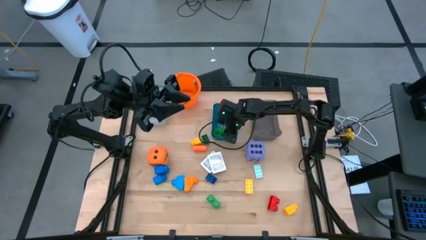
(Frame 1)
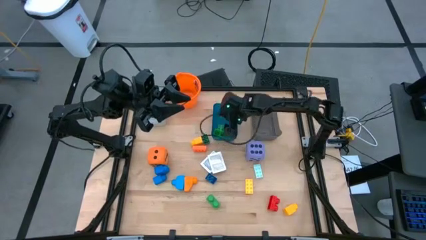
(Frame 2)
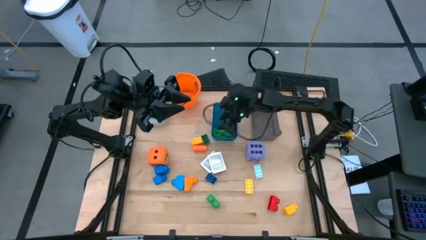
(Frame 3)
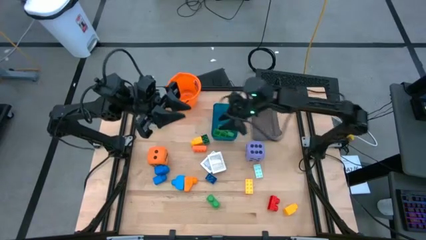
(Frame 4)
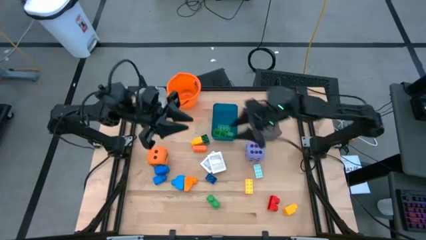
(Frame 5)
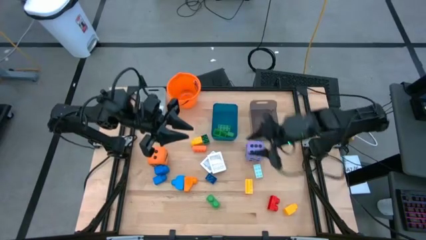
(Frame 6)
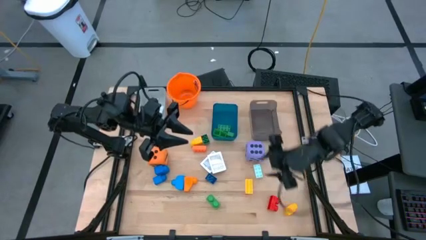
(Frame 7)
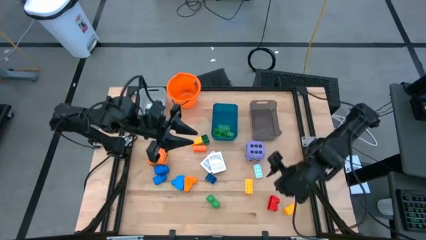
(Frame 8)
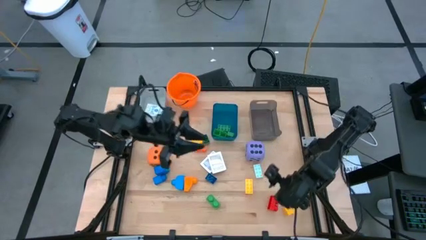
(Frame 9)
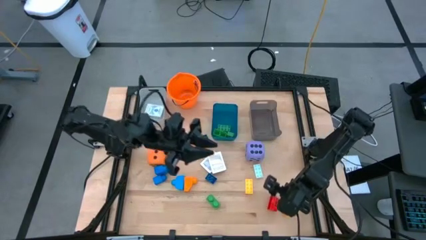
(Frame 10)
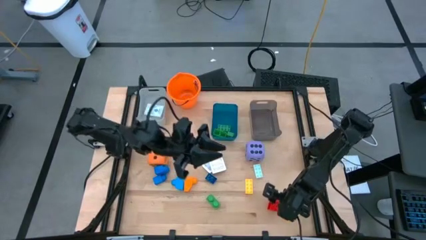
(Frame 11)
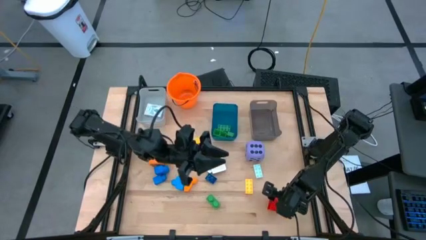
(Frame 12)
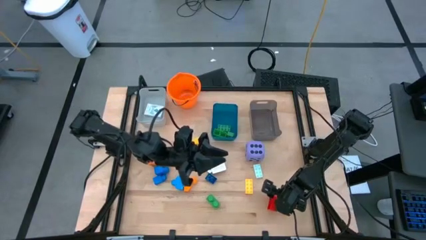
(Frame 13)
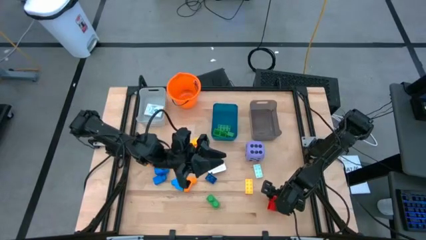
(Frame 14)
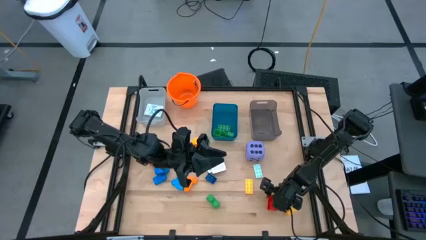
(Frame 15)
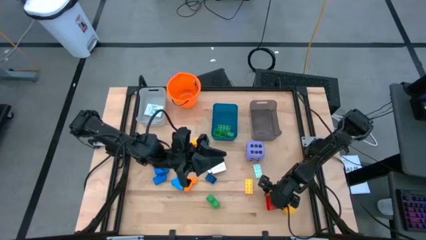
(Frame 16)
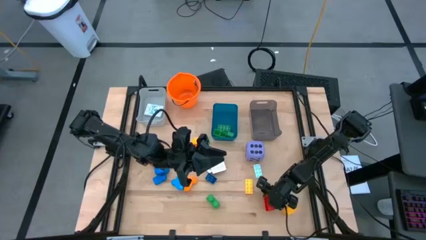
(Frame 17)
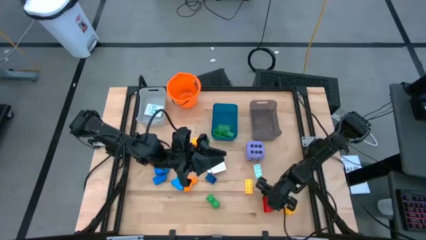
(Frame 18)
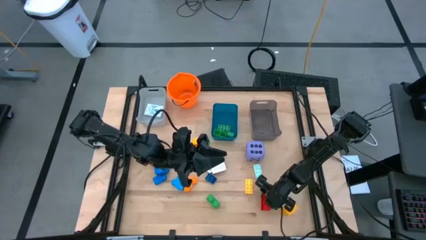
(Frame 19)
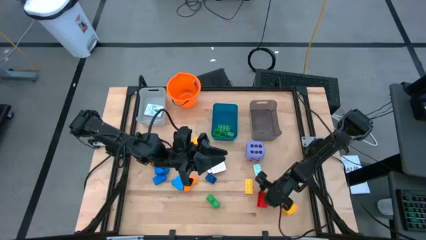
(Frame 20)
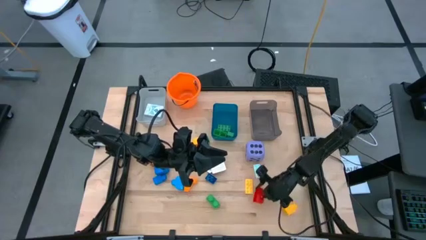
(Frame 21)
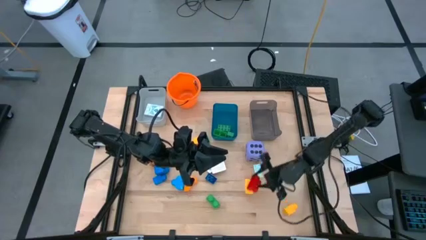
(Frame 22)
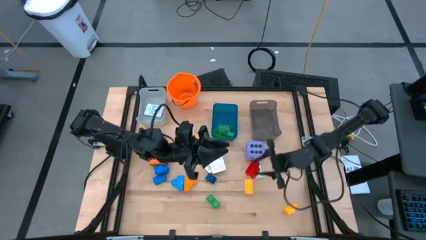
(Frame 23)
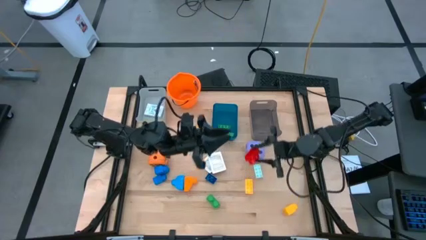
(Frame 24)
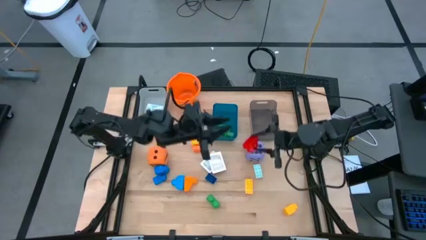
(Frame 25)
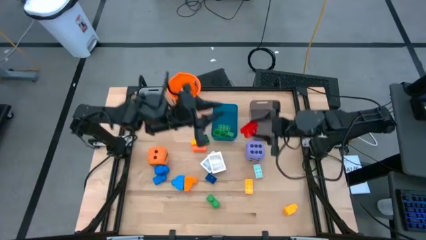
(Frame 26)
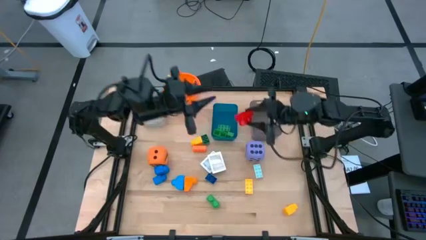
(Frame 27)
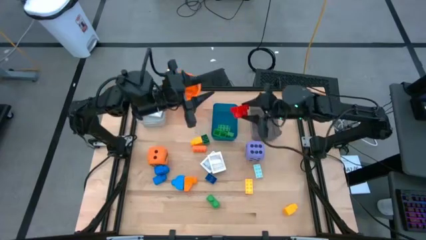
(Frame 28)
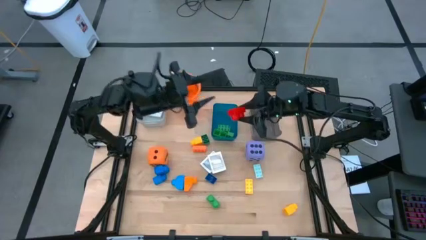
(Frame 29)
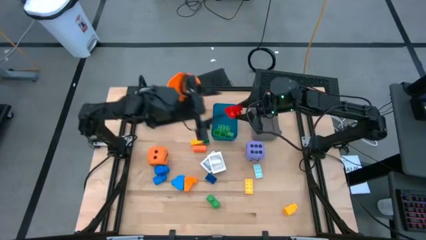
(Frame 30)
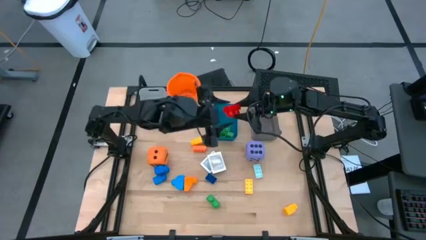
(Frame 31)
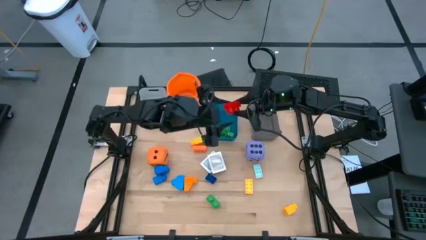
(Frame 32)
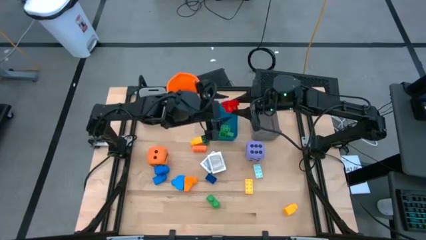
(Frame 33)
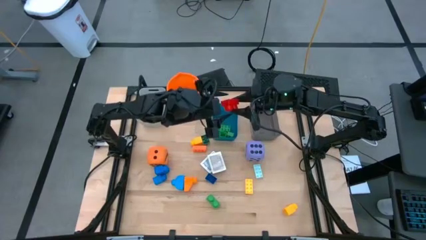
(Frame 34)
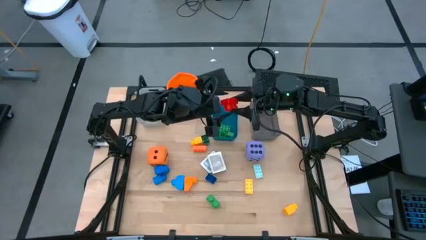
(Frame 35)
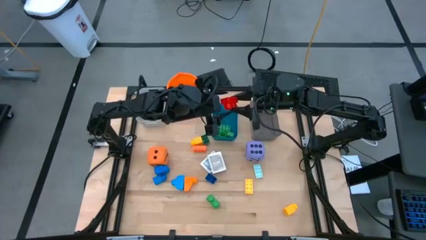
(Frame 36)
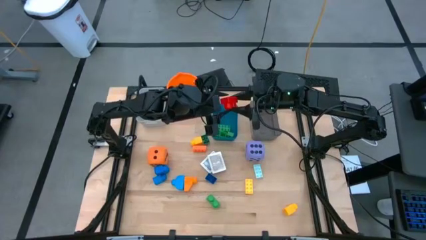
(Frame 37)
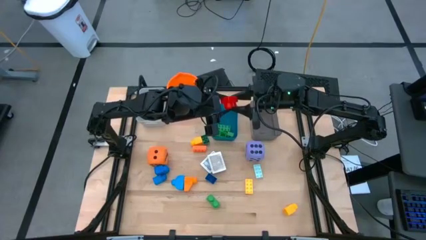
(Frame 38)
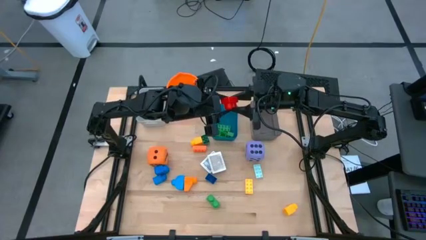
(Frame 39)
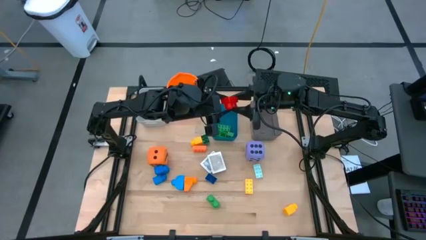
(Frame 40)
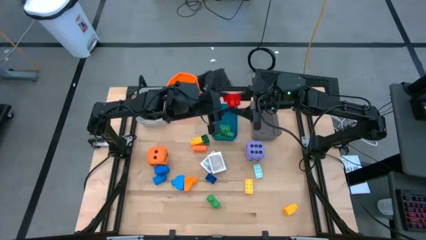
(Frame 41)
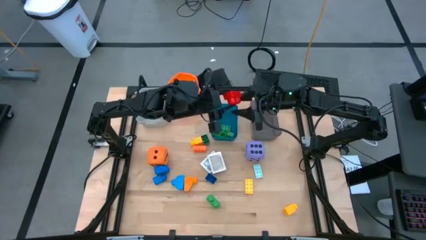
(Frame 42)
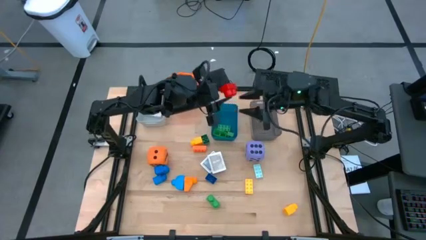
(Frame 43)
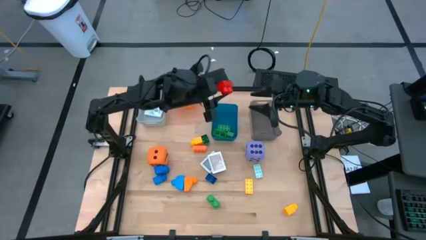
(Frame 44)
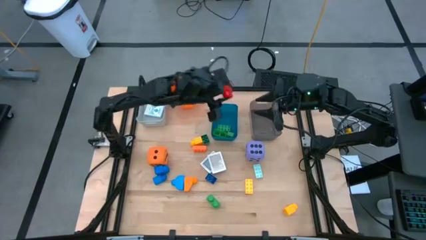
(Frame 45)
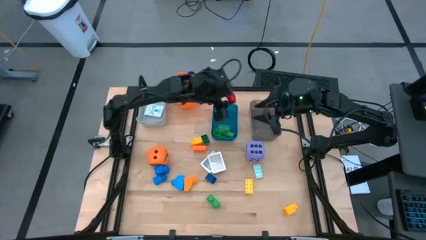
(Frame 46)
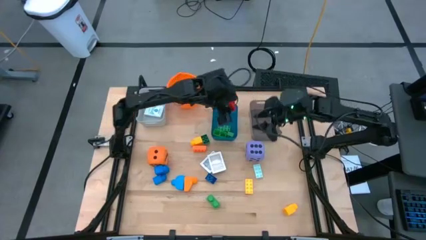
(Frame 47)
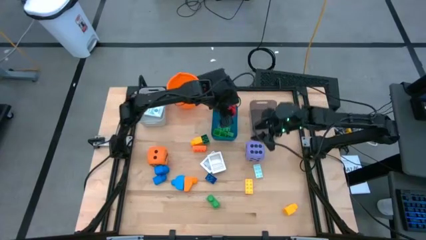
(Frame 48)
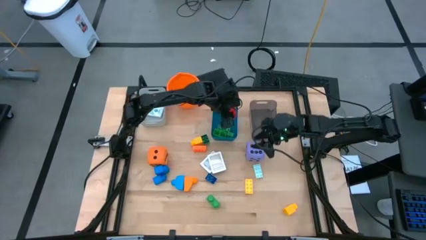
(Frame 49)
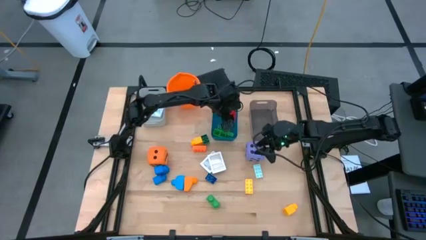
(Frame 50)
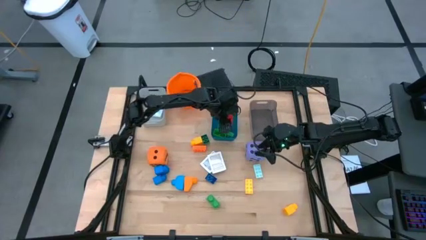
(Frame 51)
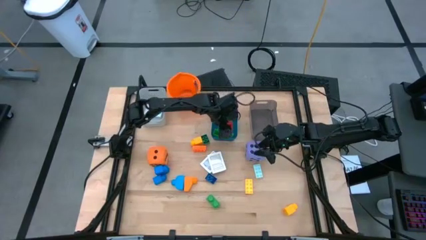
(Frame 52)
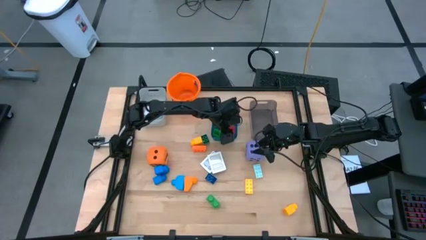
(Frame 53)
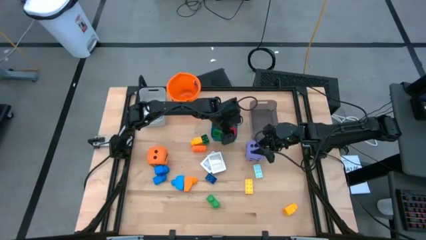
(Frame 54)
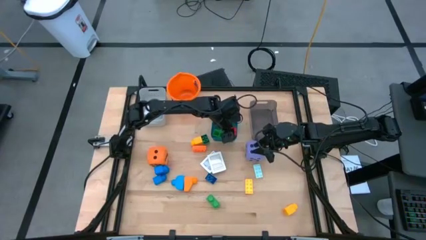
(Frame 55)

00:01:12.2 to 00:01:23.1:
Task: Pick & Place Toys
Put the red game piece into the blue bin
